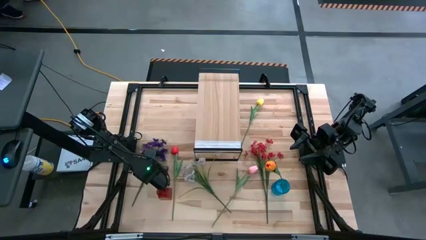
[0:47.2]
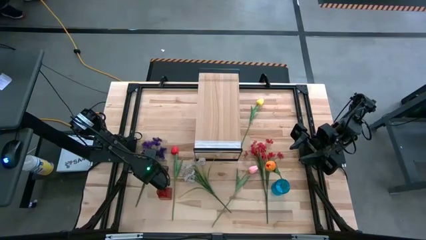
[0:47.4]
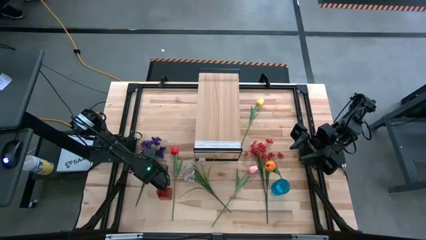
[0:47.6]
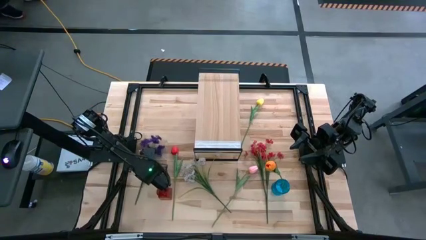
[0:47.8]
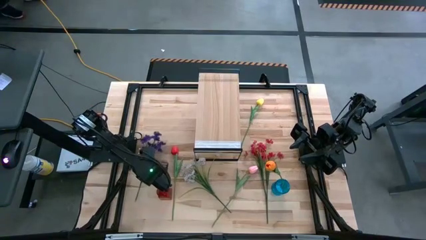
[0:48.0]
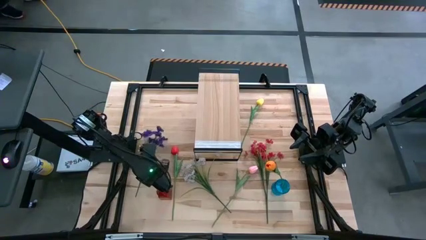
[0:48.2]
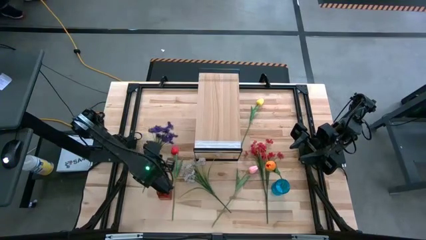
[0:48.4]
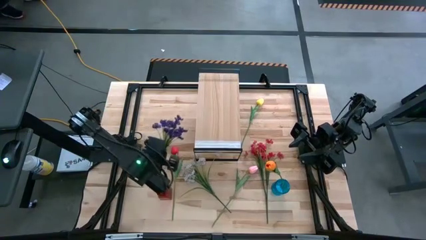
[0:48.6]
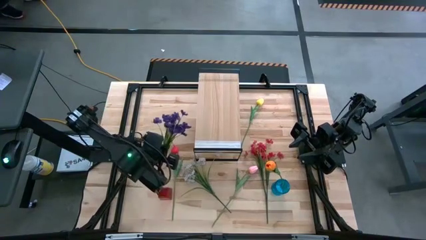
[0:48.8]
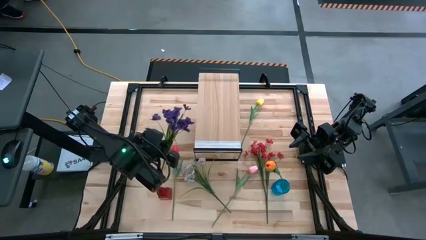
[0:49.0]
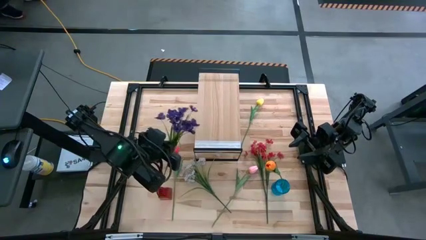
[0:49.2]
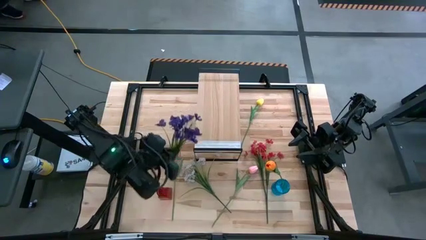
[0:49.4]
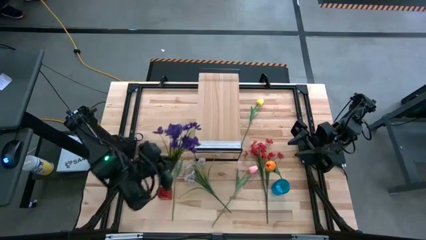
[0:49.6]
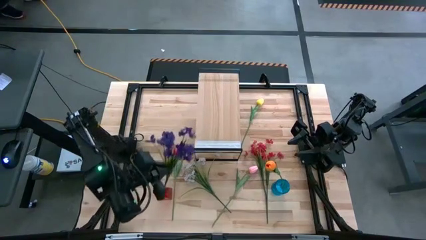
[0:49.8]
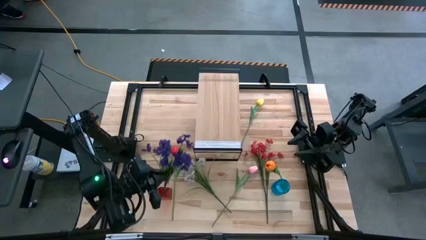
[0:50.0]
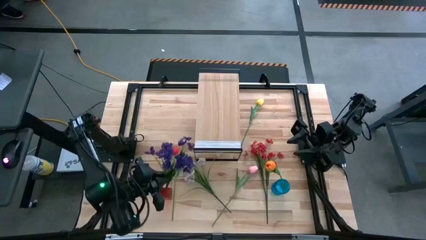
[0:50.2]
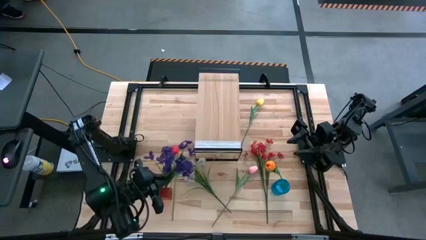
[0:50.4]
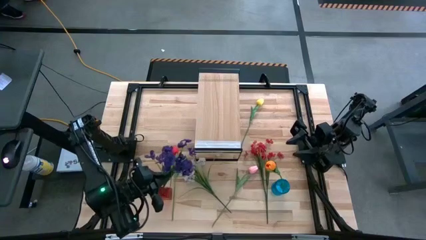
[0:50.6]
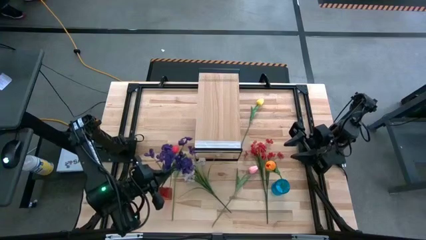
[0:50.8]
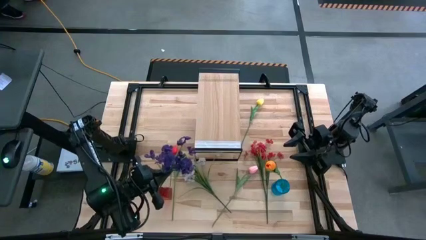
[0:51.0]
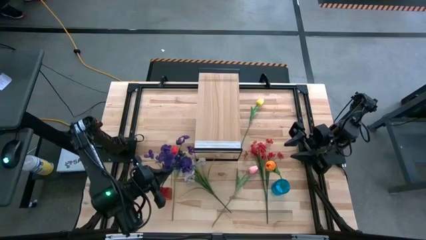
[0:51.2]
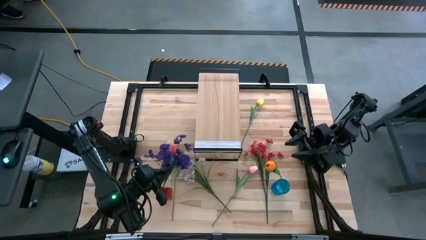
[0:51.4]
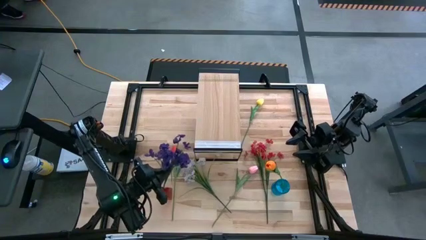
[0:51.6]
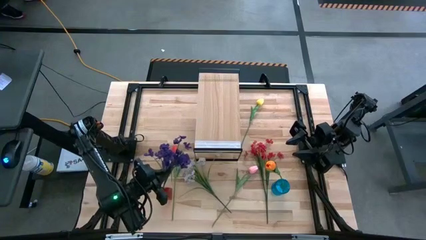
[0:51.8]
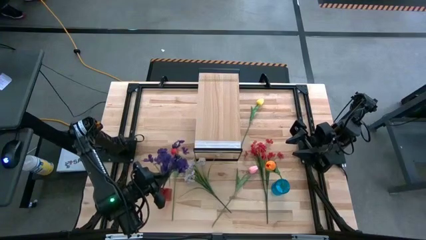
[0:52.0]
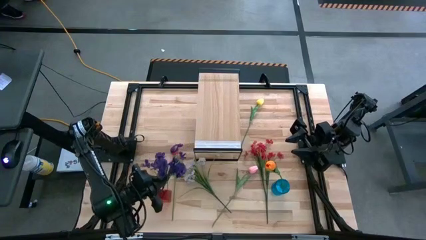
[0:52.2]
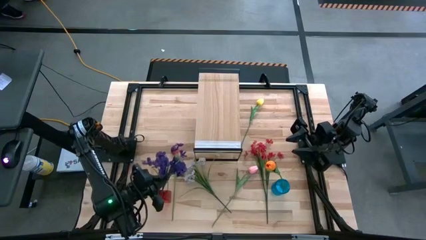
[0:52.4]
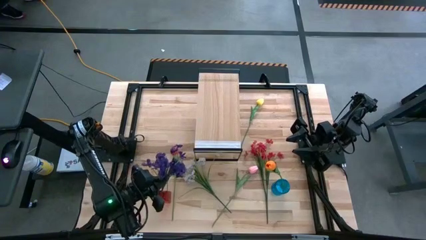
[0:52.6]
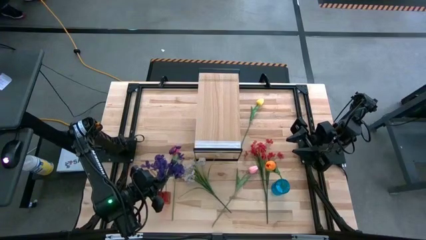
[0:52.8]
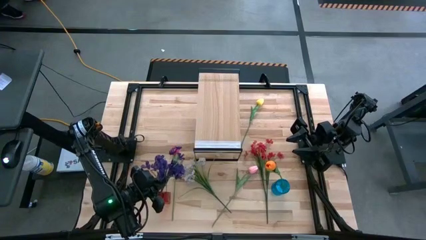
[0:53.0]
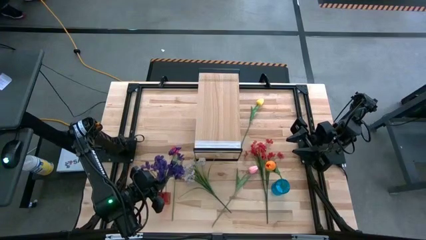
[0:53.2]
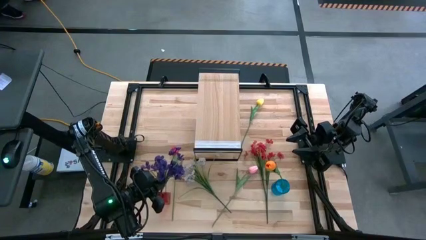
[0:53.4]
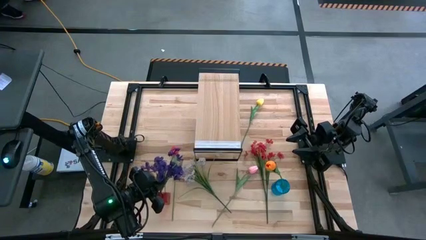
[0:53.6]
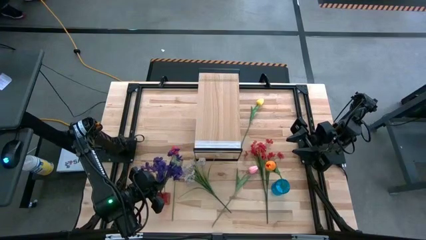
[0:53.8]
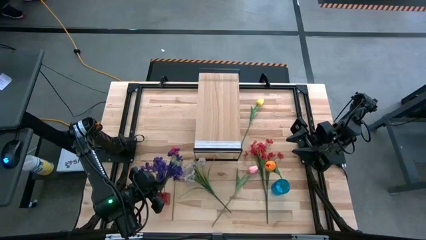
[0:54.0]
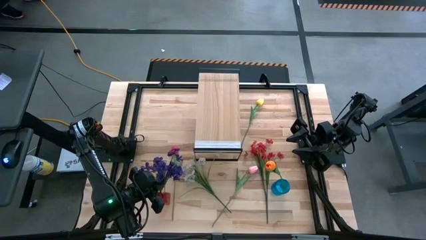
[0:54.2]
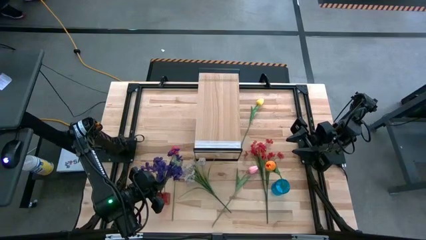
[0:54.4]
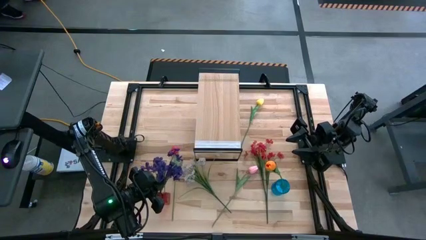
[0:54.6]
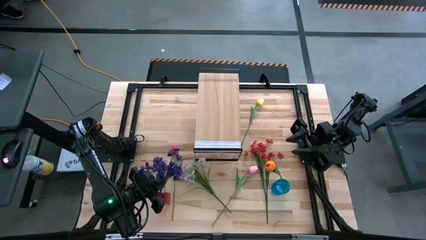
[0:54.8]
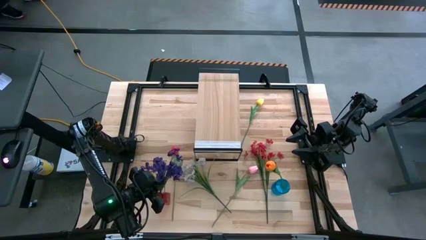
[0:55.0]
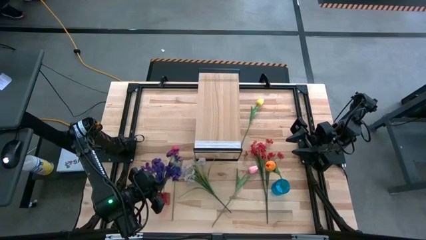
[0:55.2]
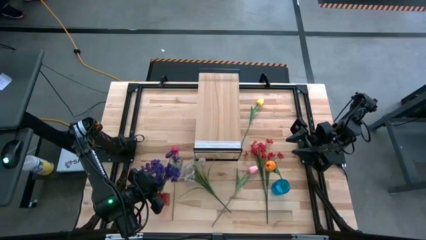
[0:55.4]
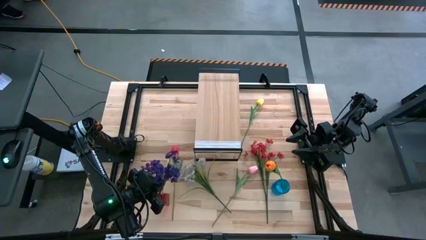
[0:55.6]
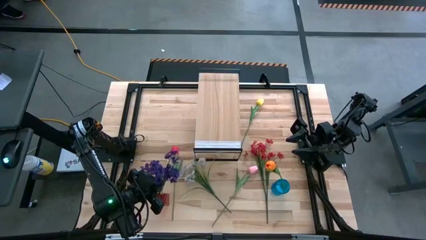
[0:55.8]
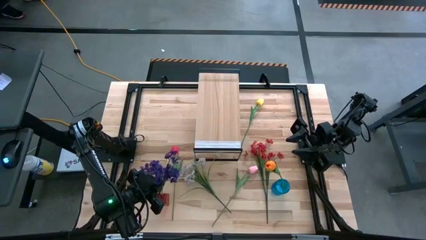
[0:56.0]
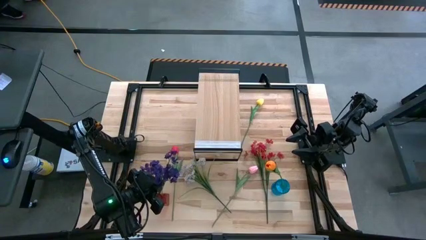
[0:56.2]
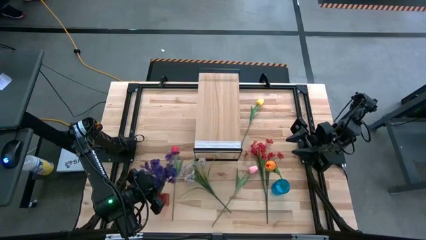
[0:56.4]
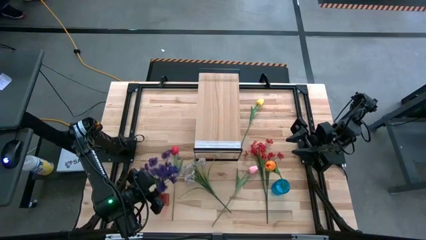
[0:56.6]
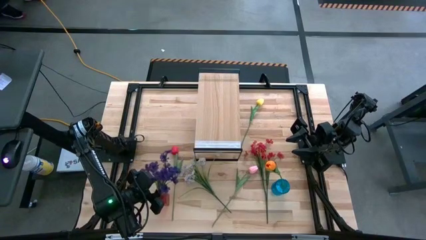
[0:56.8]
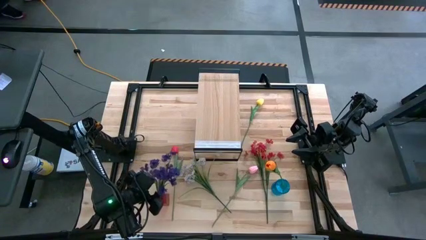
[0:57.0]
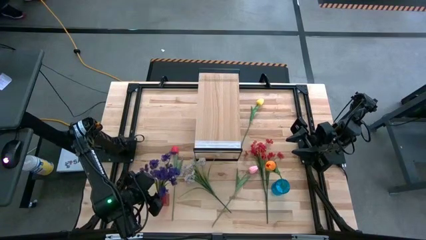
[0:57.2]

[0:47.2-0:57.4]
Task: Pick and place flowers into a vace then onto a shelf
Put the purple flowers into the red vase
